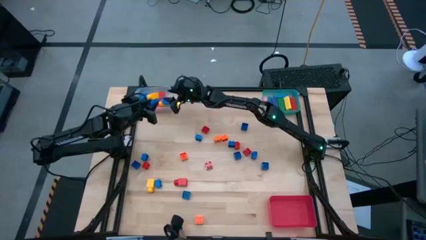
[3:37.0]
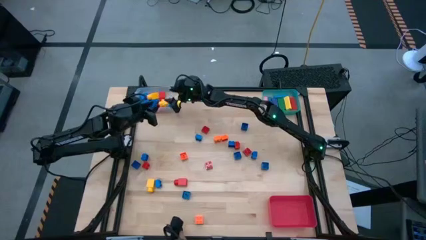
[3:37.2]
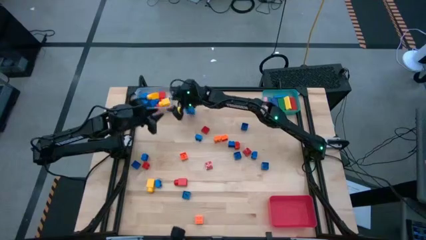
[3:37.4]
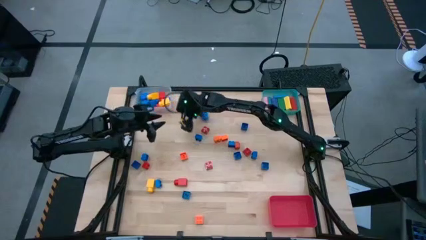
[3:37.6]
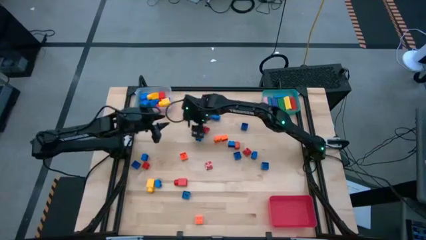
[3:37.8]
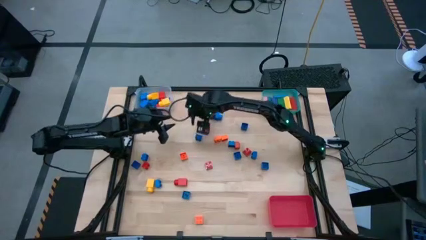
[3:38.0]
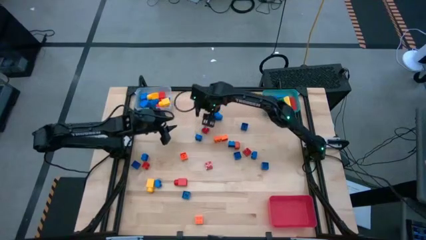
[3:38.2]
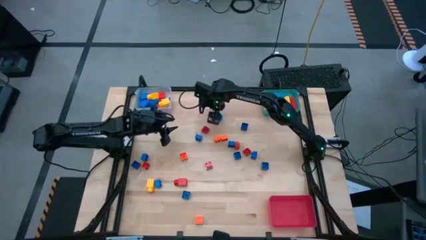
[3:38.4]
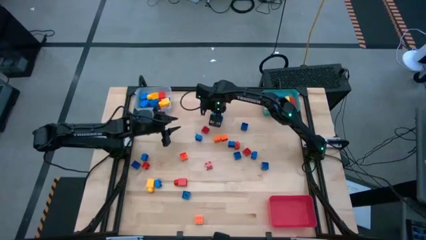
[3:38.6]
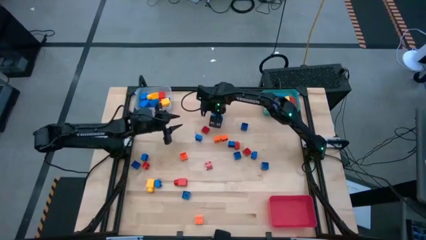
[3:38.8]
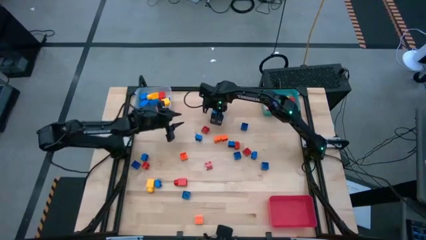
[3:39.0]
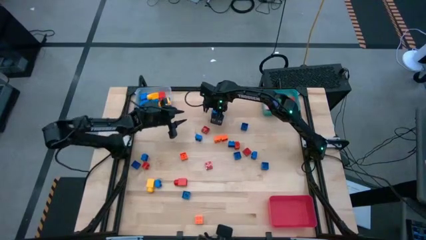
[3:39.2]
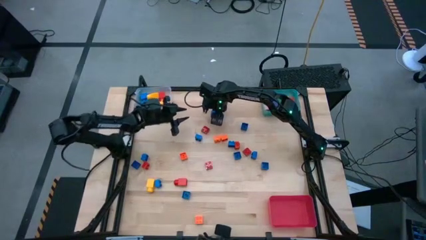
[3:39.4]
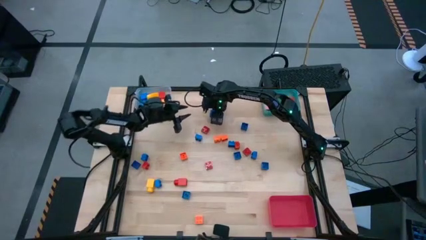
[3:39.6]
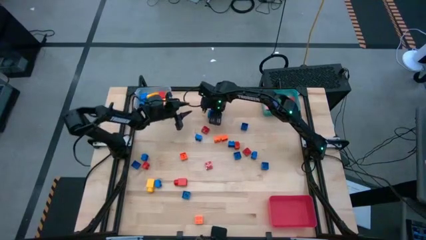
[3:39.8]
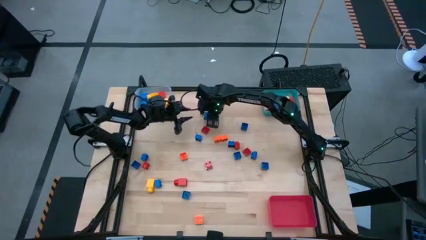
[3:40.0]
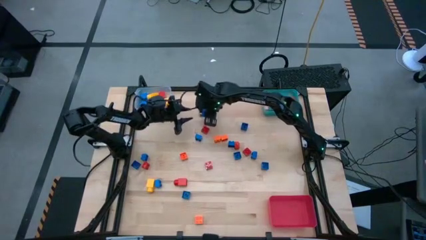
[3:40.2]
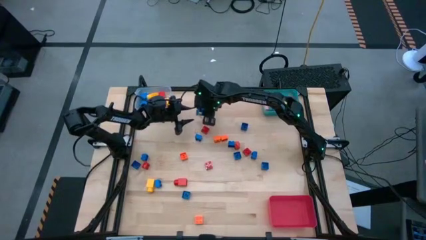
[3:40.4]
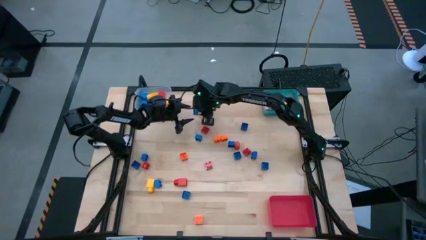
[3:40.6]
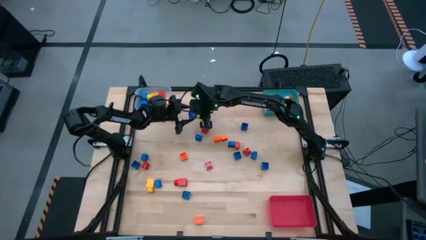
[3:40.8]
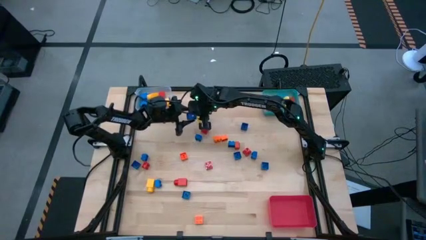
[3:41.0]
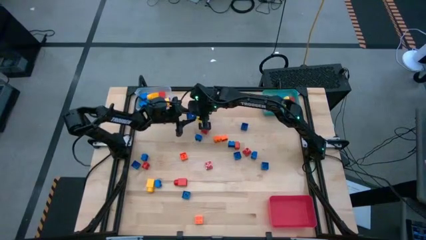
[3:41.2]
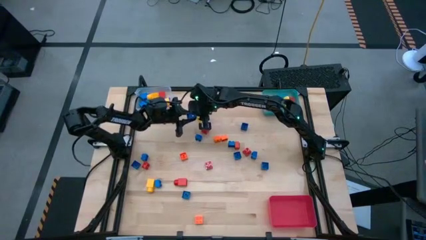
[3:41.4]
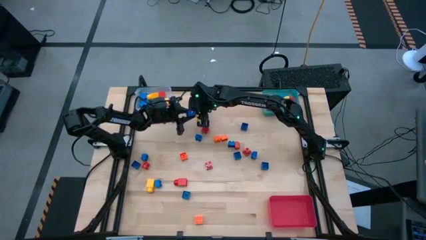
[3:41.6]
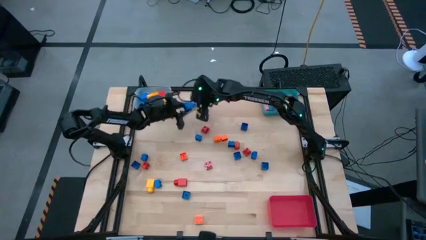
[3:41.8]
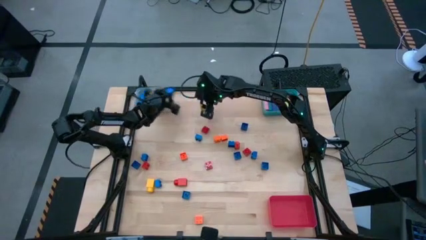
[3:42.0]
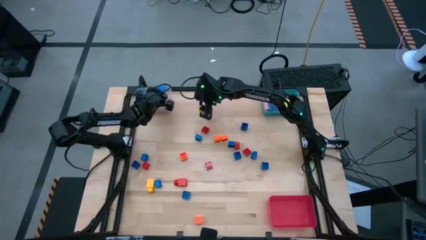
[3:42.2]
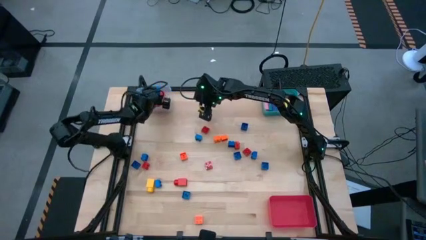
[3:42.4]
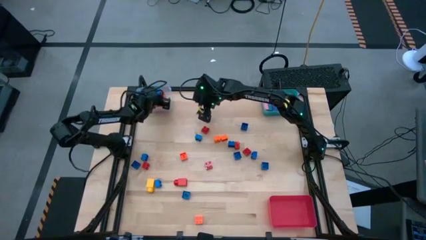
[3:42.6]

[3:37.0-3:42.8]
Task: Sort blocks by size
Put the big blue game piece into the transparent bin

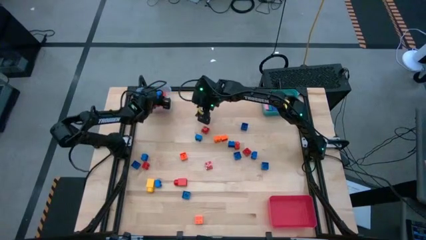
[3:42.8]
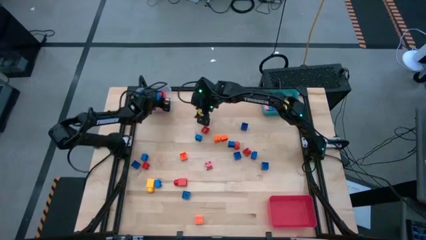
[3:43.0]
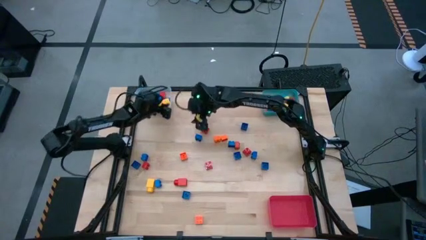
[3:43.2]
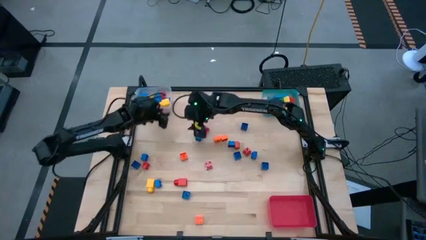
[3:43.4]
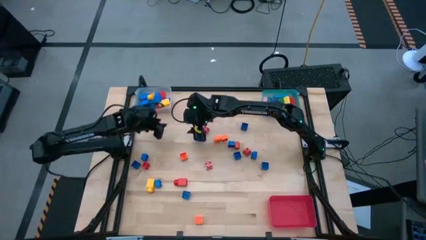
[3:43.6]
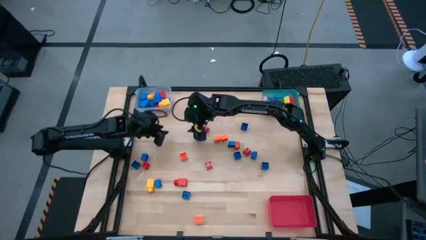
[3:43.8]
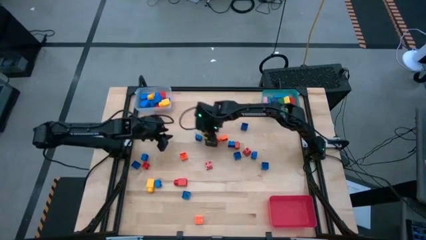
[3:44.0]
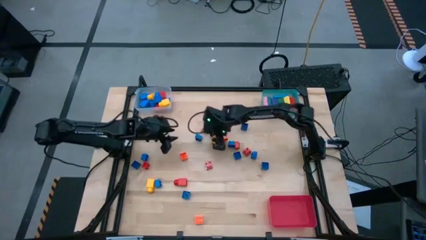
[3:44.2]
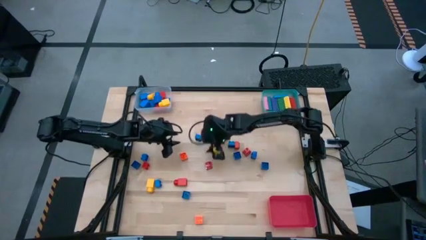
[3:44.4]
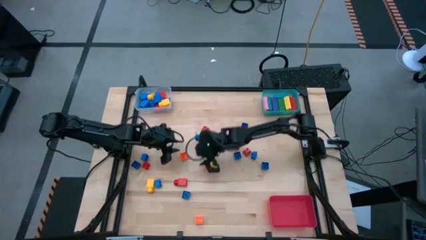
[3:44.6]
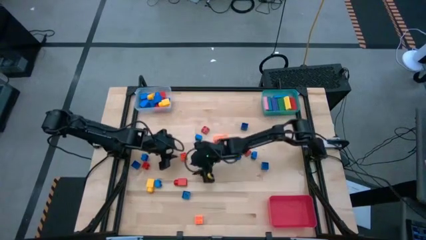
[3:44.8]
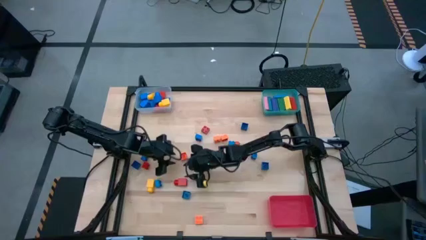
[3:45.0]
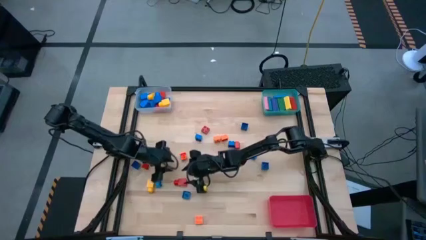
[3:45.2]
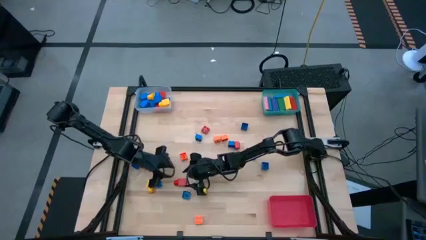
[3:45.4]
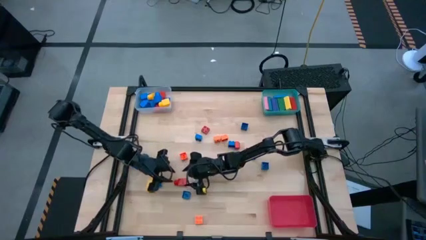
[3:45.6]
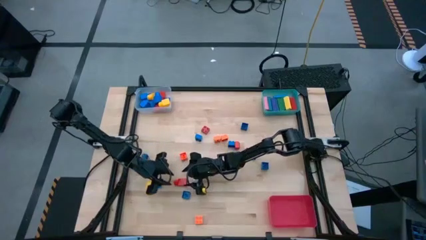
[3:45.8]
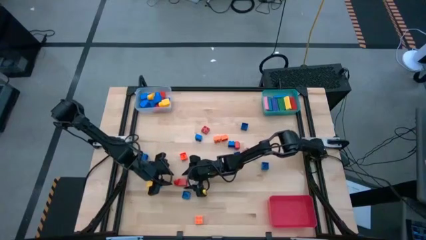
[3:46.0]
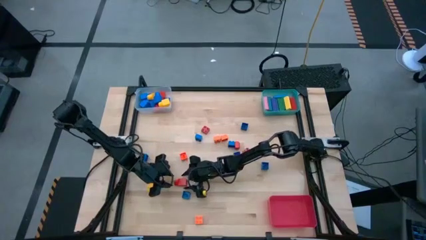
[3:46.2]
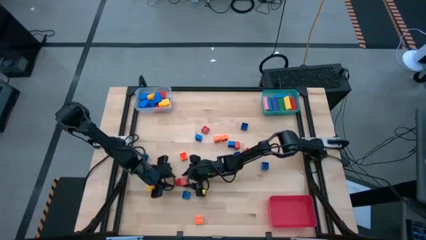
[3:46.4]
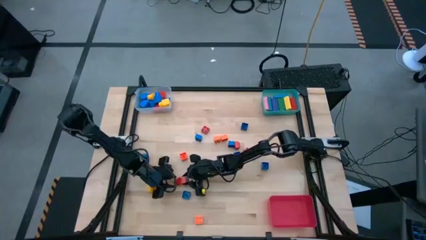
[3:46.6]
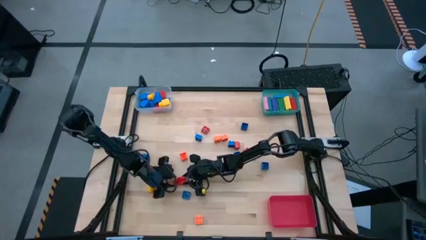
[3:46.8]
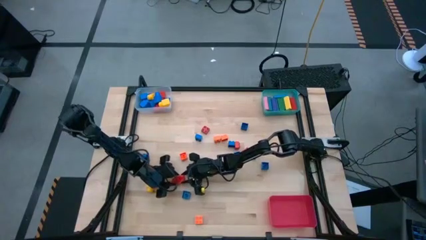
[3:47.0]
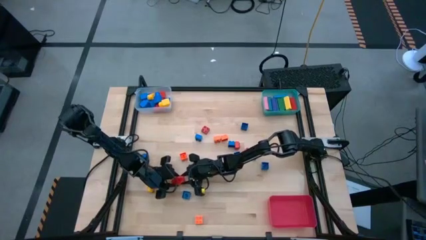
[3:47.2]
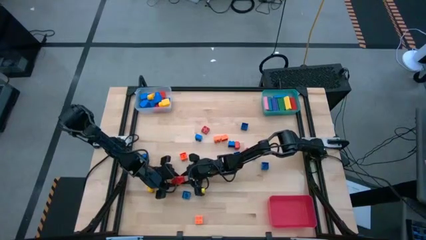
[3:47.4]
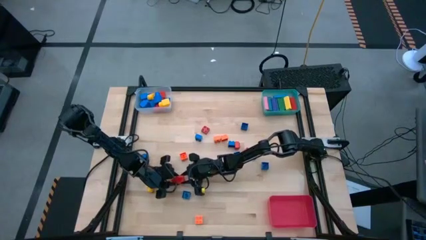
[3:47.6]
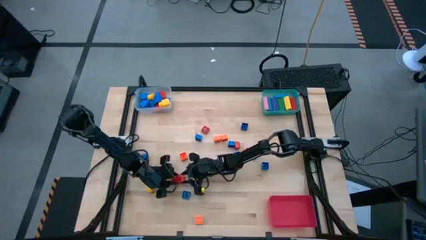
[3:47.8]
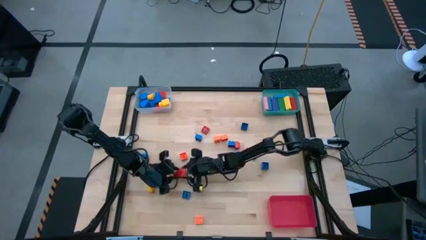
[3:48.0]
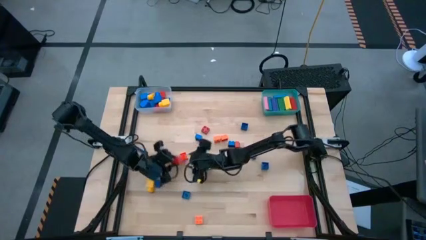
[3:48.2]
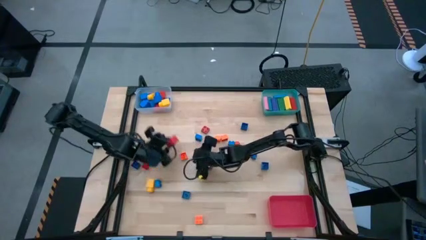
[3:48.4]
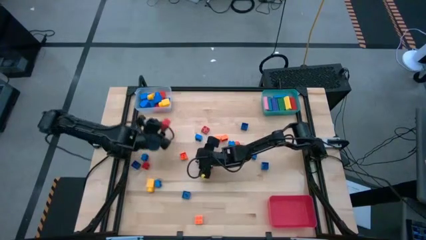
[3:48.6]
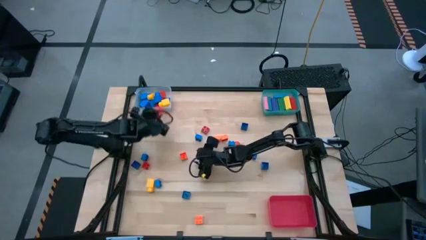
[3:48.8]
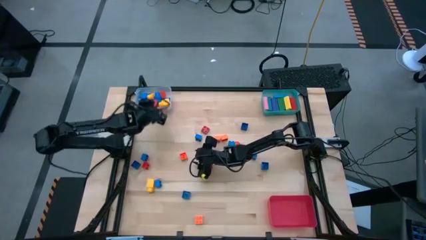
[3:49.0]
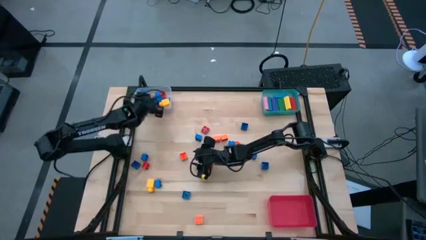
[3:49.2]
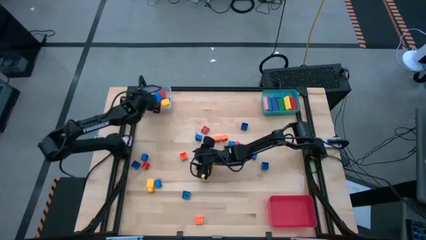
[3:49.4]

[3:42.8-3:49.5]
Put the big red game piece into the transparent bin

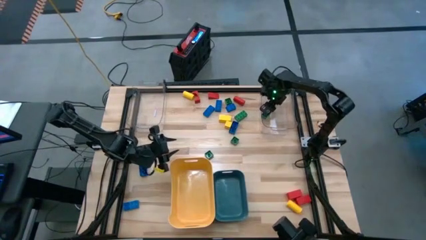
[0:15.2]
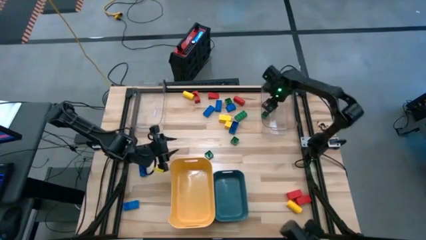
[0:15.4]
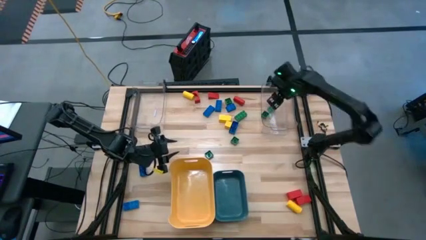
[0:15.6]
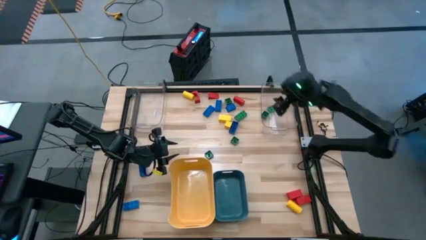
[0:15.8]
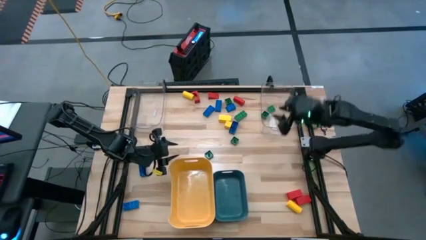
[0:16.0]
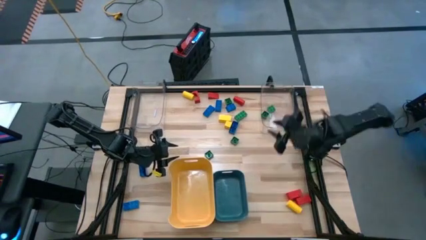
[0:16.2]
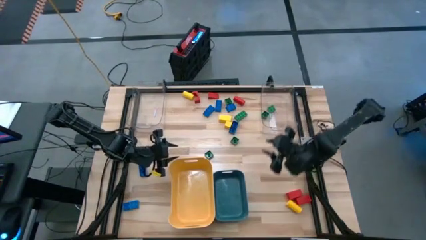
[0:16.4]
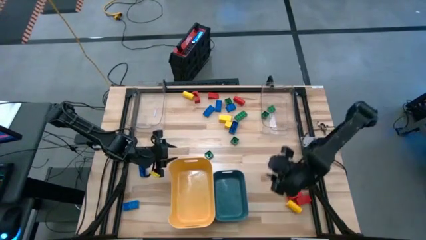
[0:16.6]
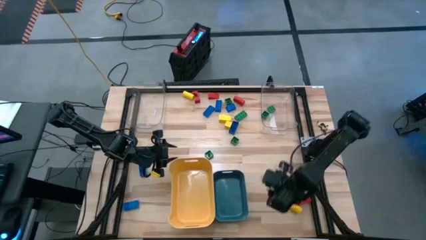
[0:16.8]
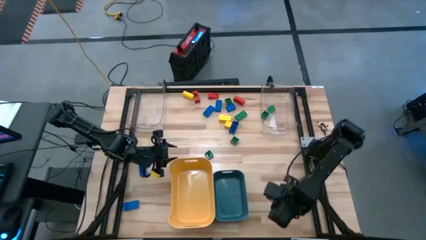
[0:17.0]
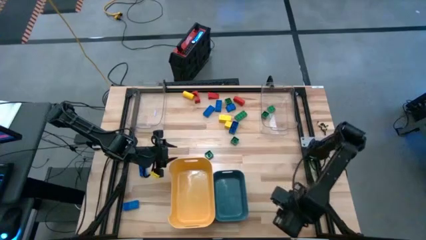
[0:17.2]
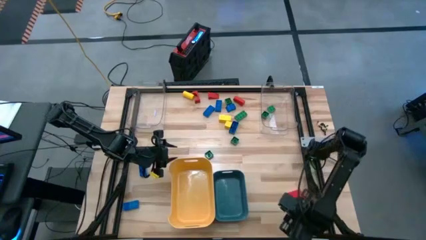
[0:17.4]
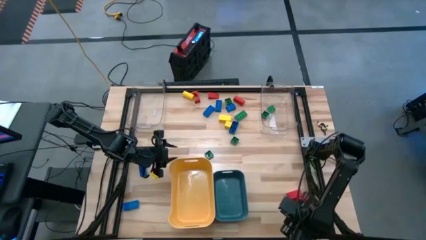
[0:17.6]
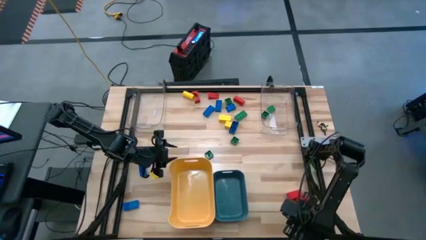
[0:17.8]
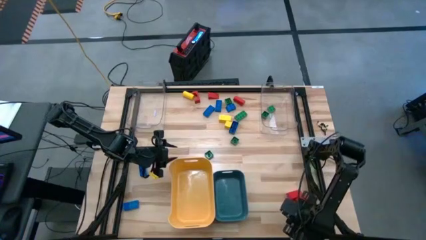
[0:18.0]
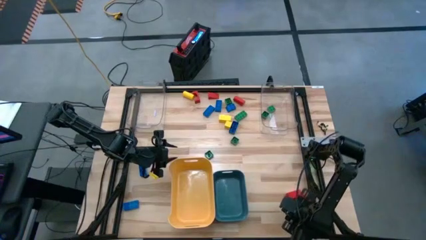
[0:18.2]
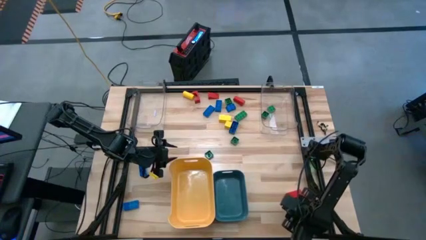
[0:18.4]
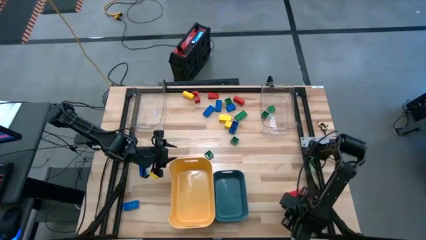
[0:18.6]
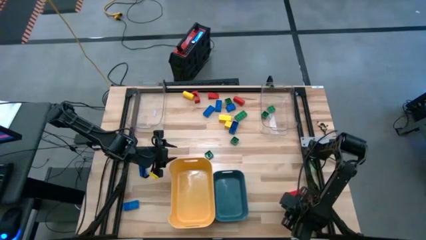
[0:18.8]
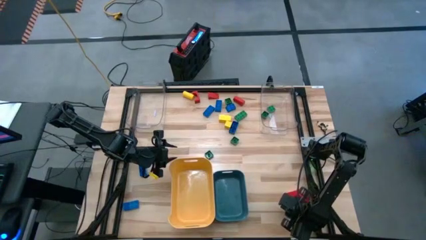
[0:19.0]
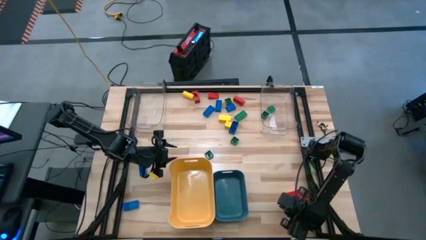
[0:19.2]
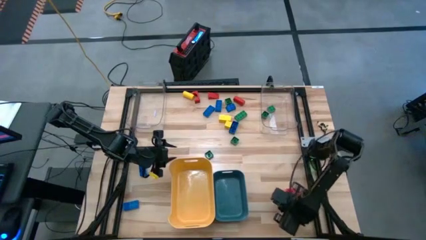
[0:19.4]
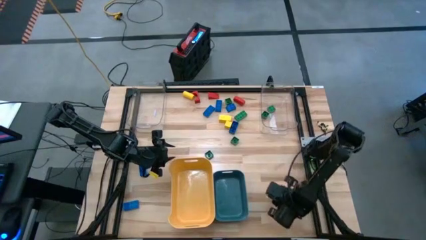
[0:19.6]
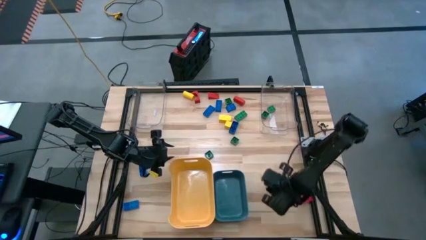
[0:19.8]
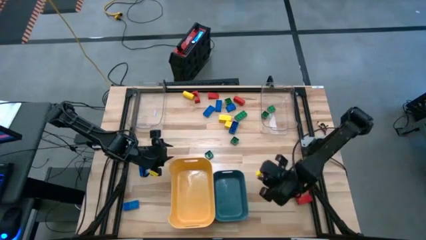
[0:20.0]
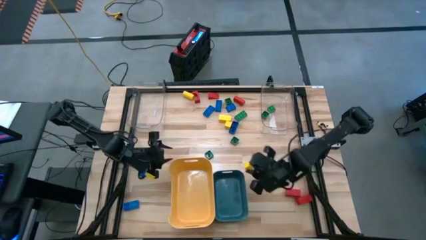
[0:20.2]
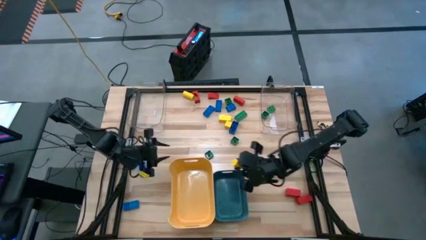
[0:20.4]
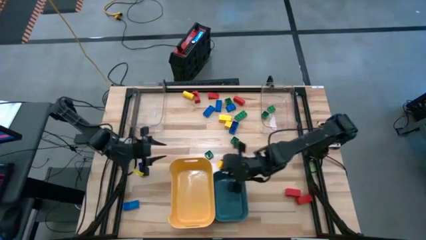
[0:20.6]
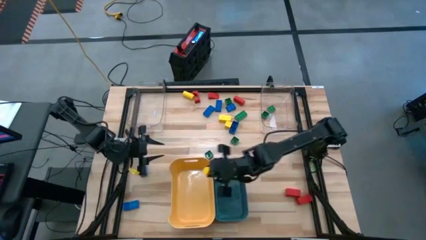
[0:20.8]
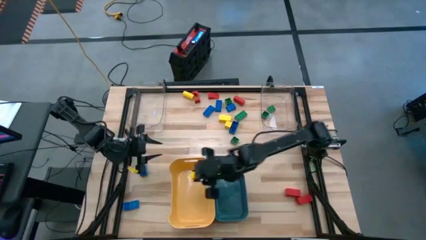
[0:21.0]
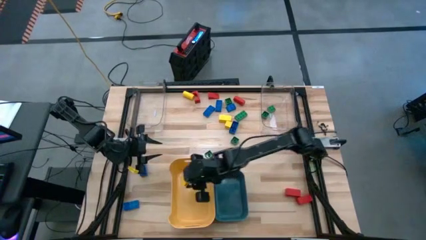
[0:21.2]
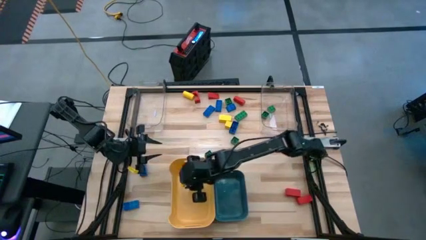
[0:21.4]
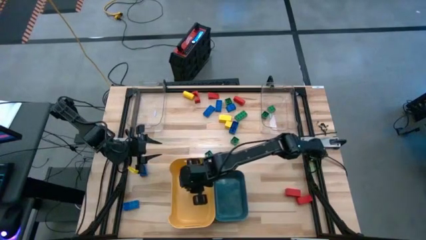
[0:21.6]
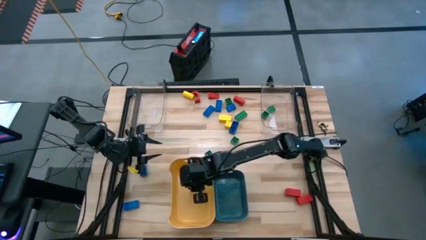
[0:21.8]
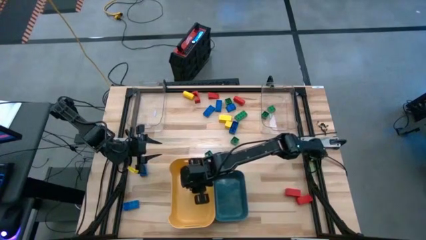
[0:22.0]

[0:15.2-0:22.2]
Task: Sort blocks
Put the yellow block into the yellow bin
